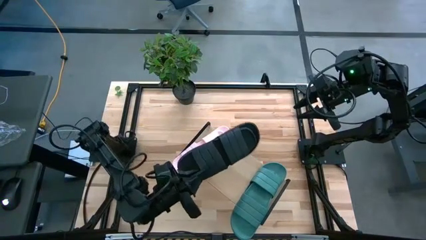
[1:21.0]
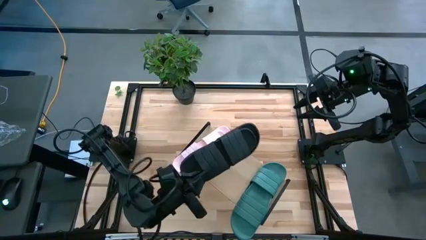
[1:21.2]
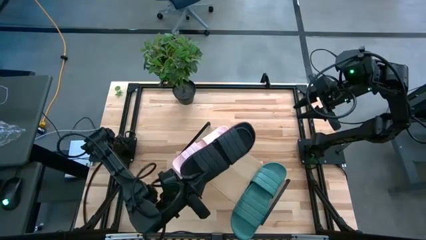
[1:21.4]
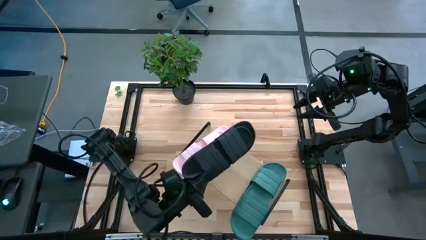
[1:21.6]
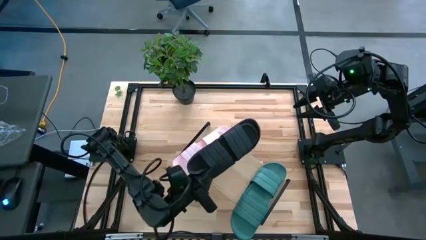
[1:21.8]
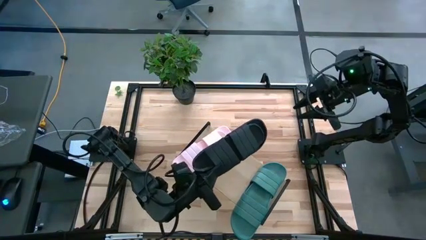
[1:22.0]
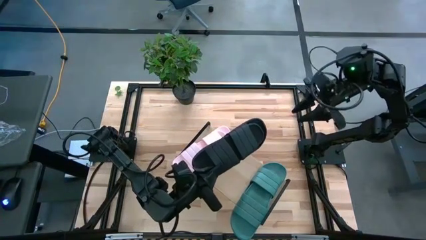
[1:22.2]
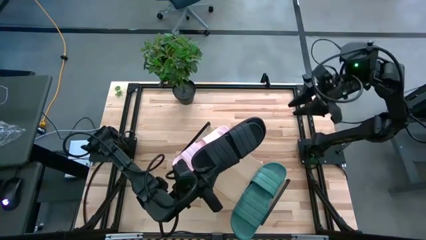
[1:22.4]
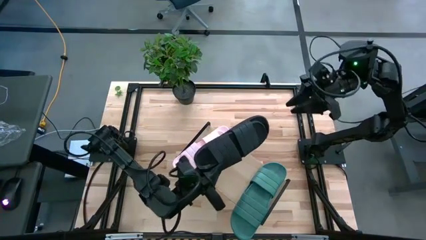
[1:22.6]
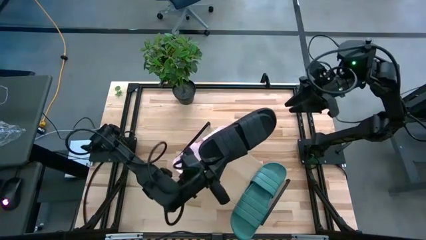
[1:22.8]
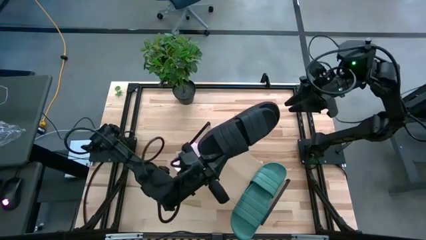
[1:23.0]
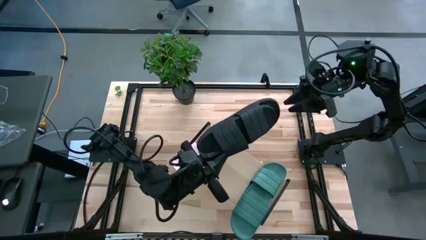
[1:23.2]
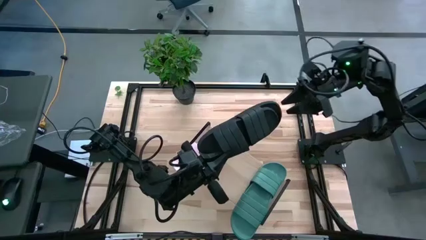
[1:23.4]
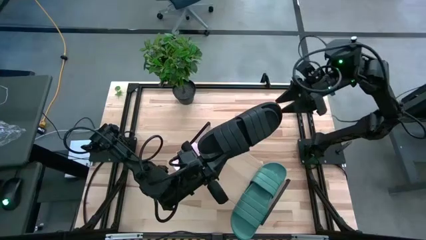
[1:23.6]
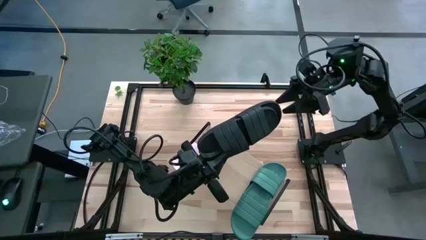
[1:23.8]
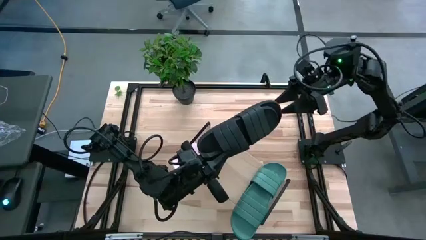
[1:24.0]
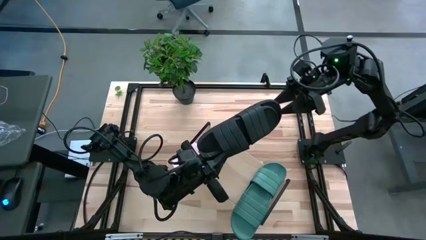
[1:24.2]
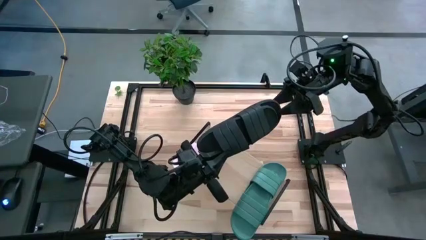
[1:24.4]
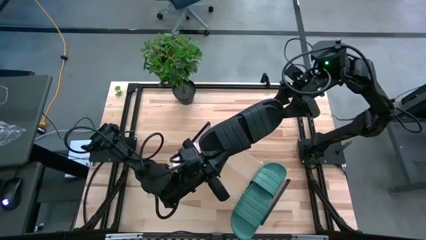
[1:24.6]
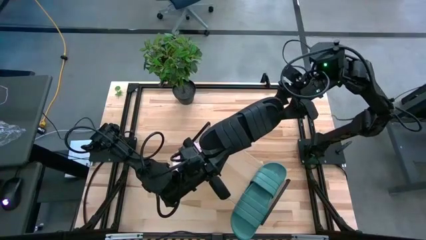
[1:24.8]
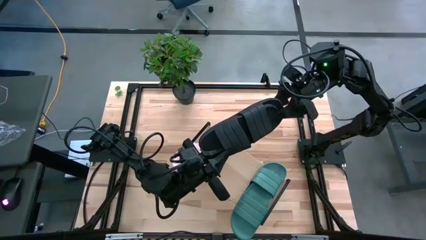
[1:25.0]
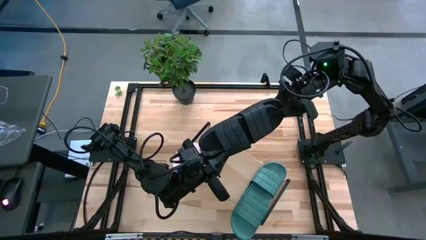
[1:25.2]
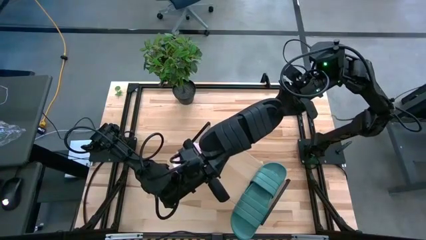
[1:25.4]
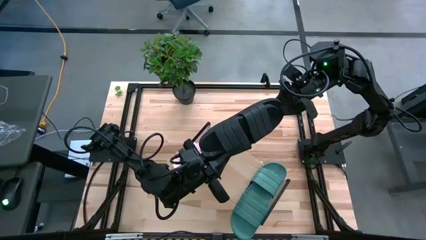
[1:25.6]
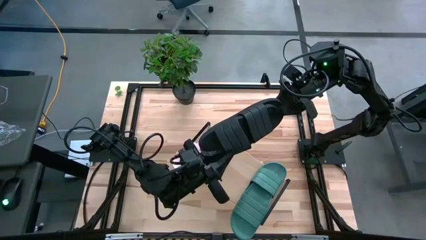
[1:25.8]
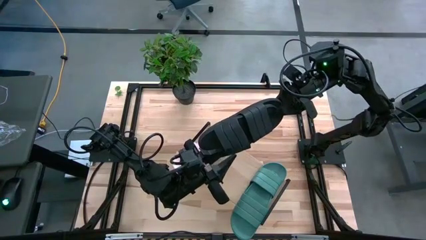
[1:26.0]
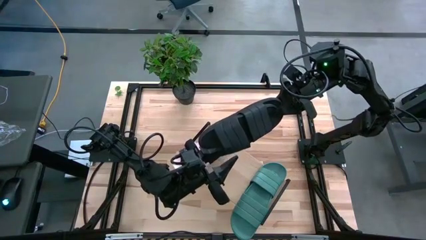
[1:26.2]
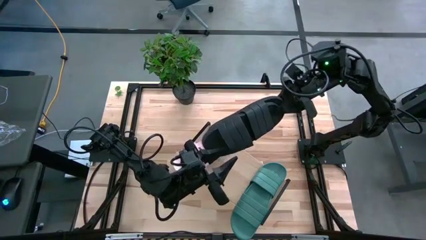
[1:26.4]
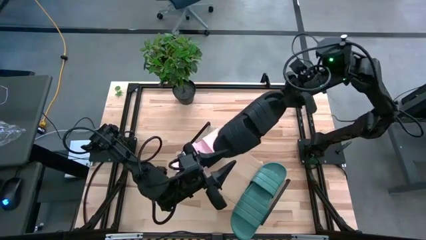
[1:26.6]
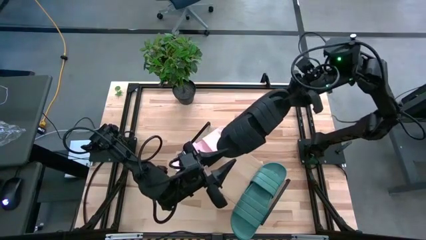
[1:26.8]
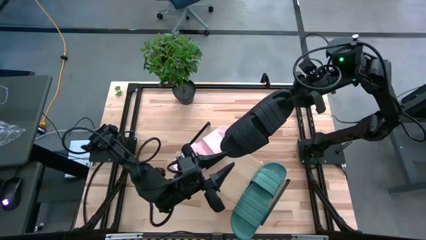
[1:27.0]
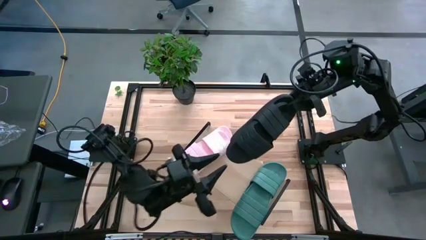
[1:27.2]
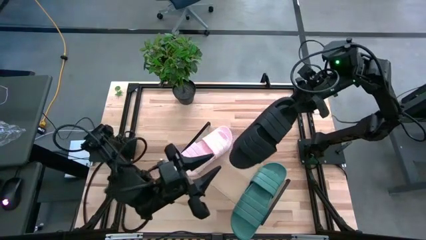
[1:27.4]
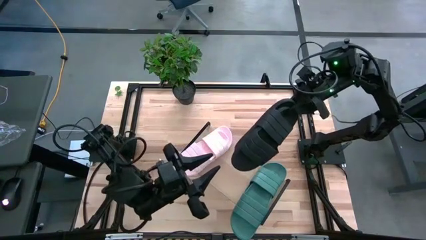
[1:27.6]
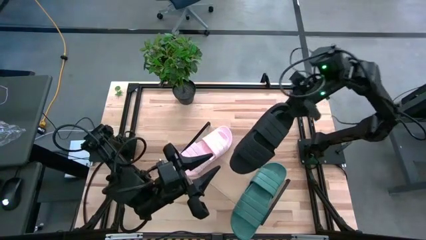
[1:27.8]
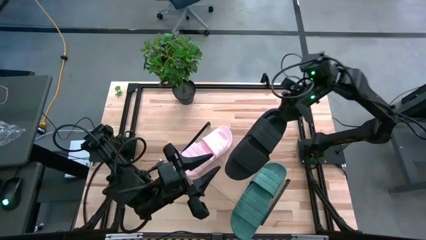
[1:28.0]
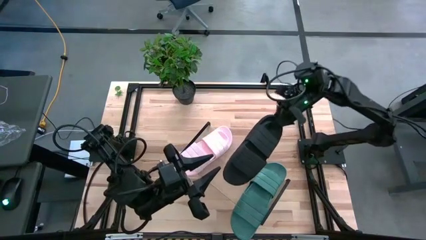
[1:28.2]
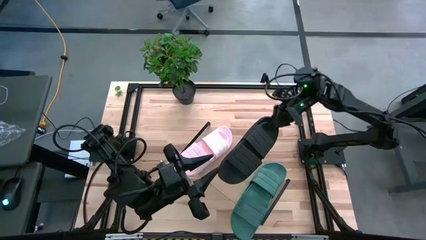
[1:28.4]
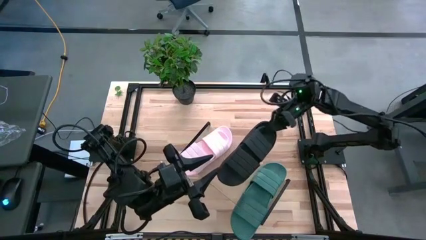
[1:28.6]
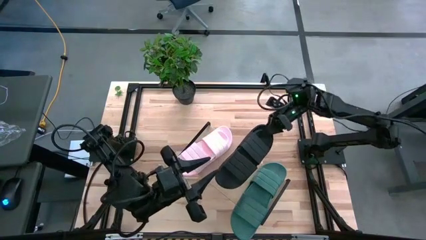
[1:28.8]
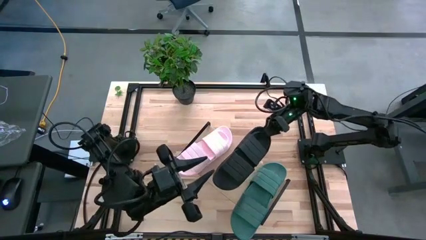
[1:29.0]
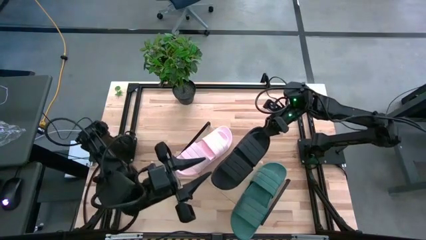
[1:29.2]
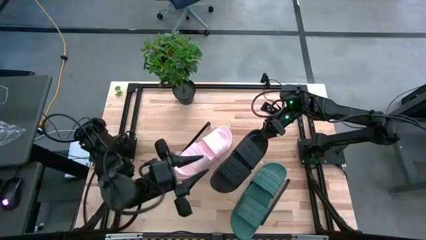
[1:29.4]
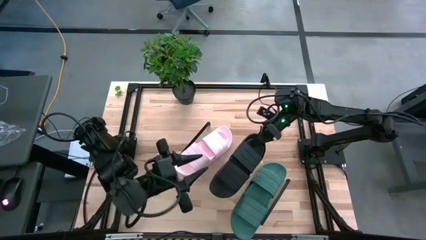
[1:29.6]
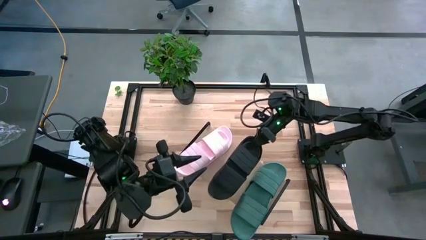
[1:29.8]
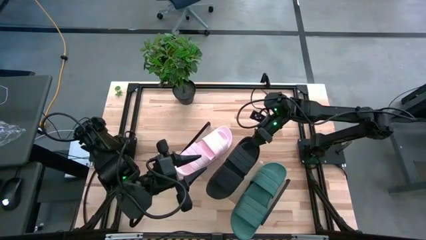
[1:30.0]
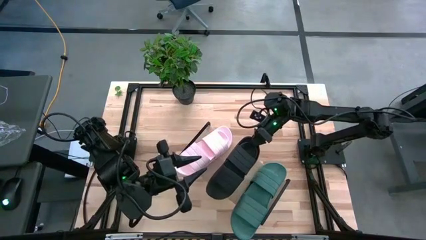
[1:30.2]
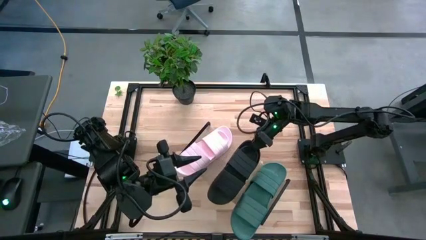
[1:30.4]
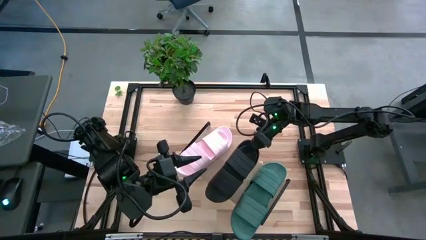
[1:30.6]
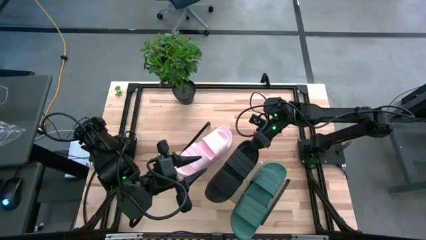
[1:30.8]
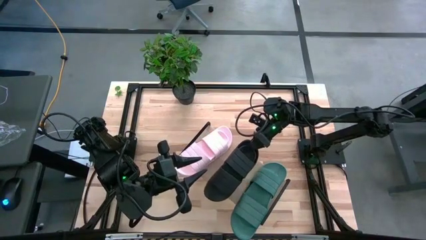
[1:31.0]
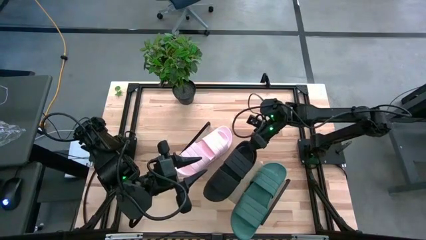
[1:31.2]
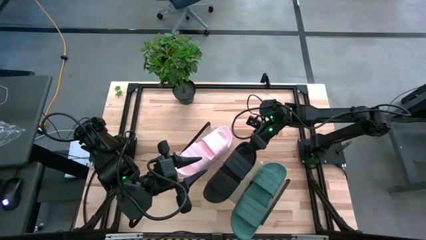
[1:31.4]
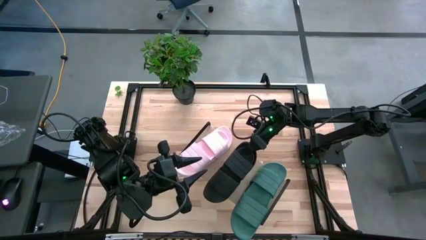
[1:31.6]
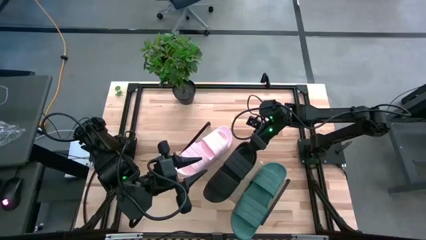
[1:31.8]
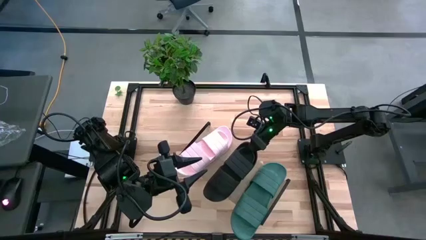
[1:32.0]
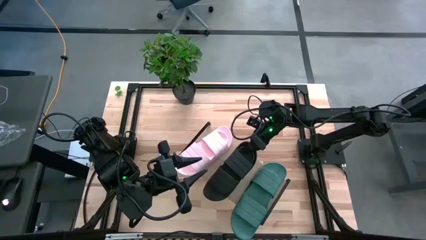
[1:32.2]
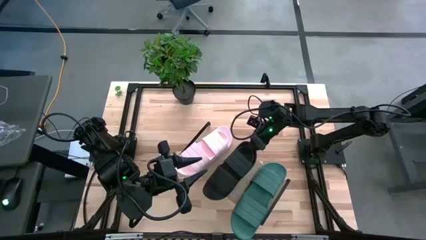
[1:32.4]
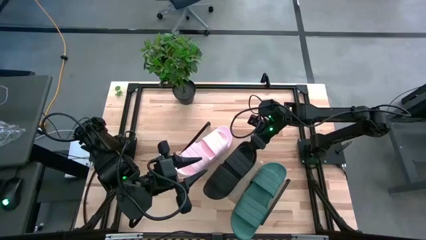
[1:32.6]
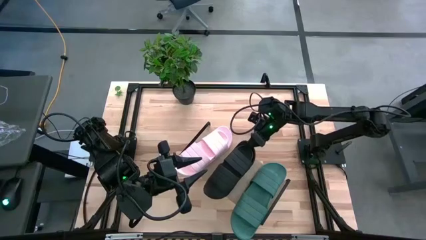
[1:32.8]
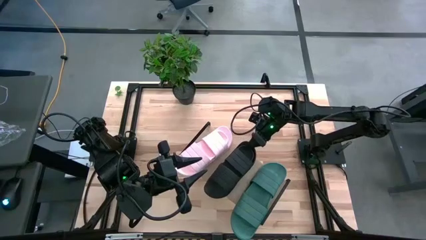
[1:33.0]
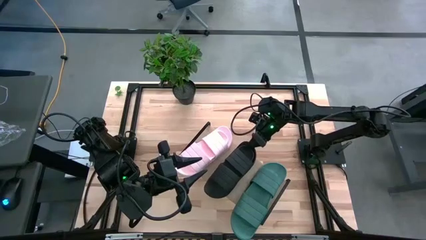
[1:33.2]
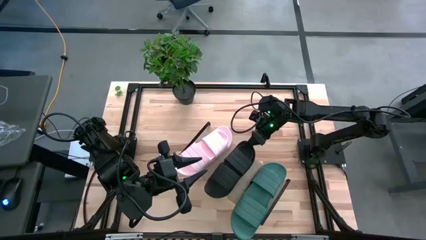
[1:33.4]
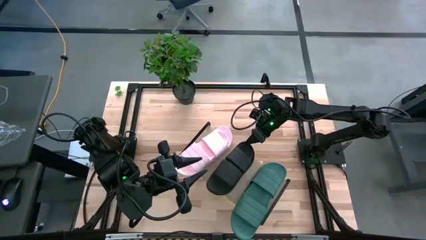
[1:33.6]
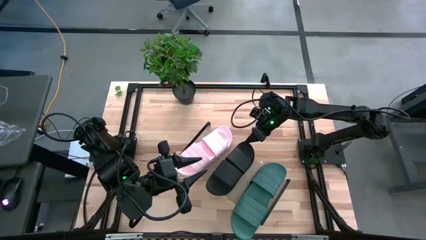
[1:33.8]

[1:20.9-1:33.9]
Task: Pick and place slides into the shelf
Put the black pair of slides on the shelf

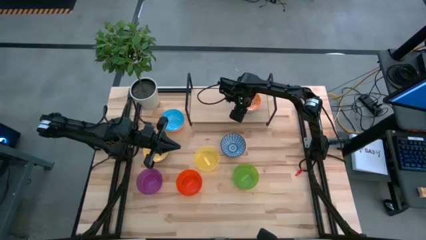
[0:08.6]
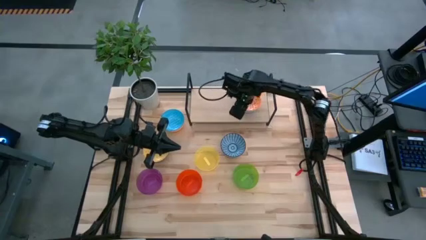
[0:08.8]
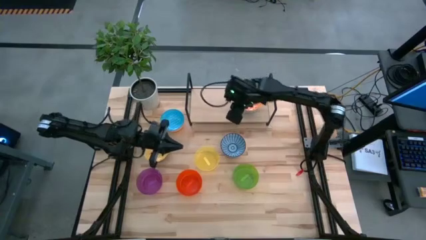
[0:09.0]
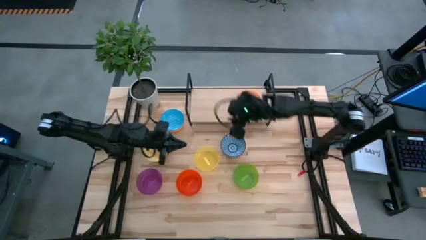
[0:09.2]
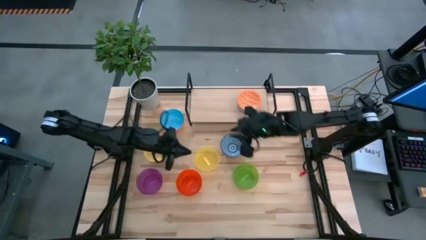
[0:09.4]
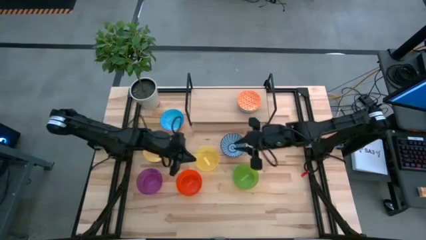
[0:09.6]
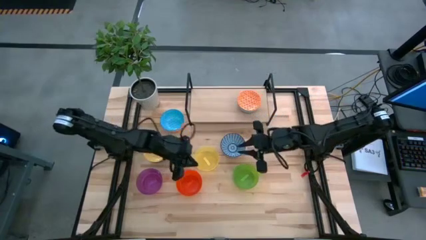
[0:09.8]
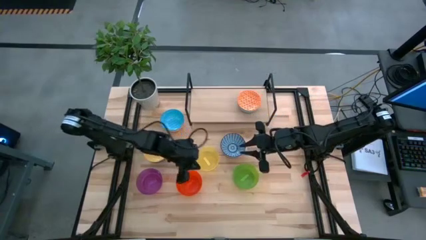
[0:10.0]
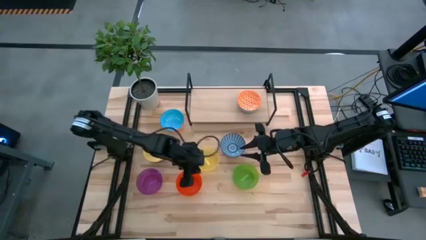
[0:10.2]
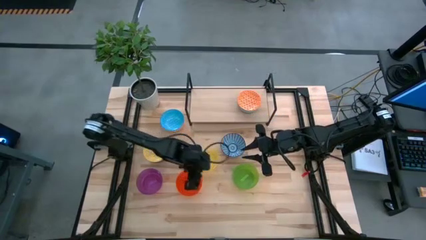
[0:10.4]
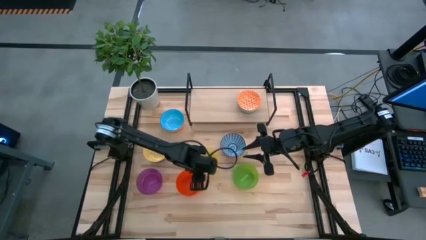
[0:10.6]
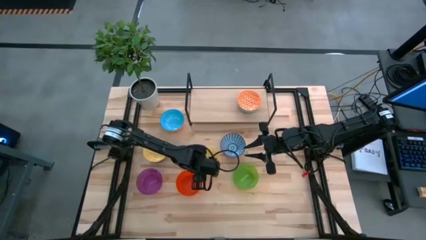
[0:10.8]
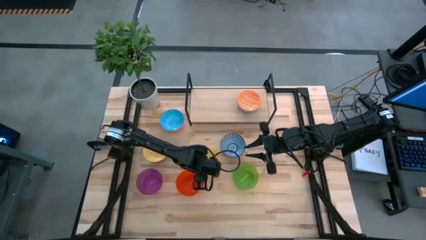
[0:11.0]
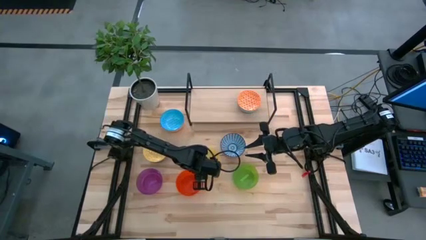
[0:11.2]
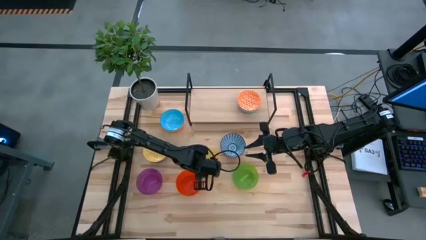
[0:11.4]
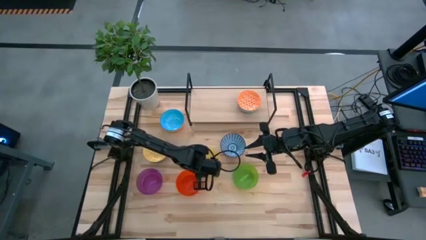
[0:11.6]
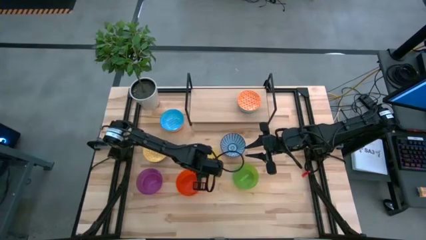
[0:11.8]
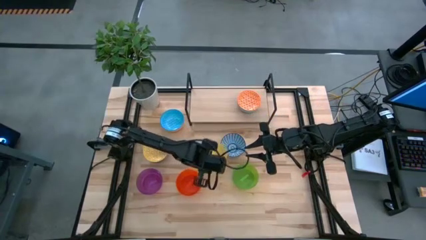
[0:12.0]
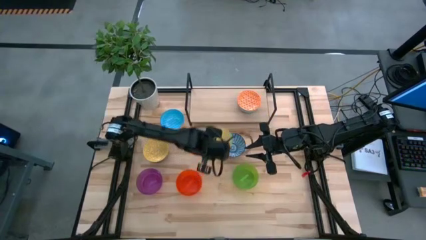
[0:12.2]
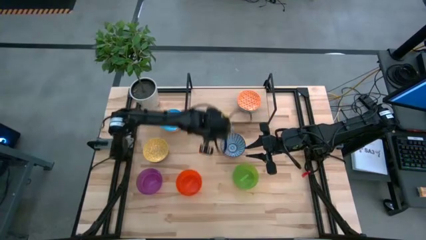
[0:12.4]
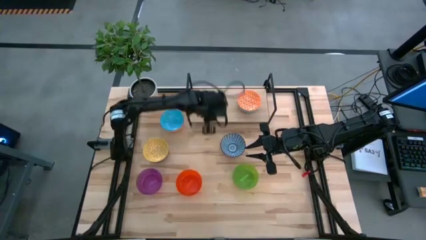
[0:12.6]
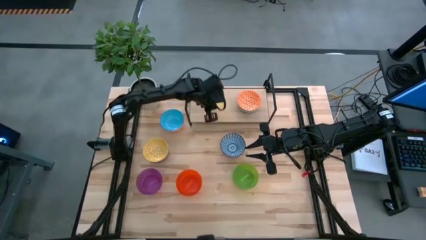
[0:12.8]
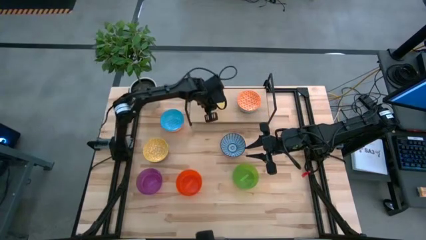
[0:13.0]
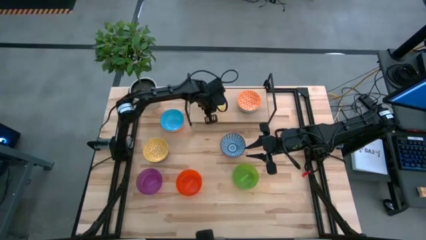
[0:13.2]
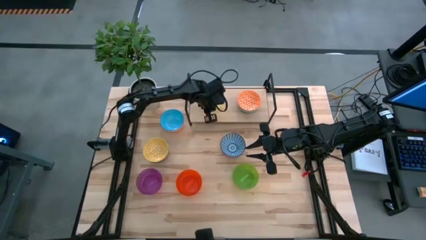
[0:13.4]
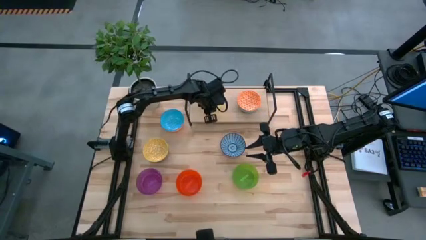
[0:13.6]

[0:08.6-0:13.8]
Task: Place and stack bowls onto a shelf
Put the yellow bowl on the shelf
